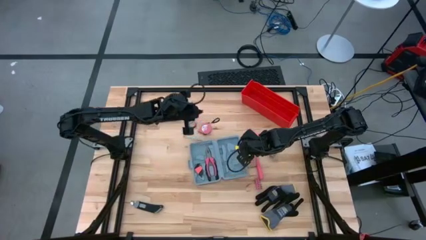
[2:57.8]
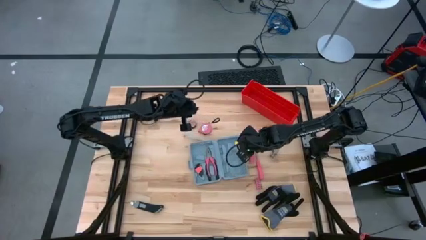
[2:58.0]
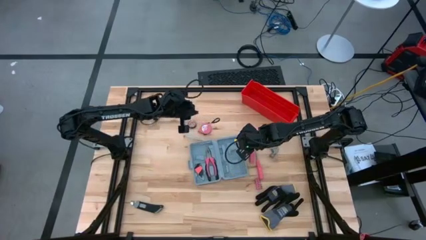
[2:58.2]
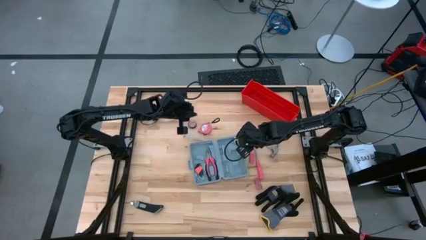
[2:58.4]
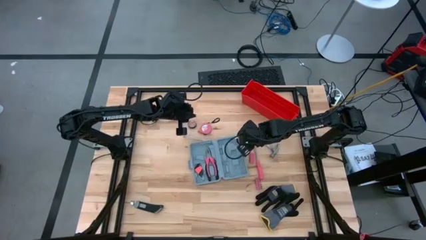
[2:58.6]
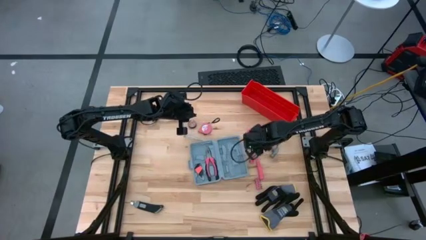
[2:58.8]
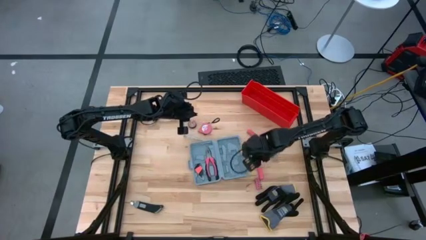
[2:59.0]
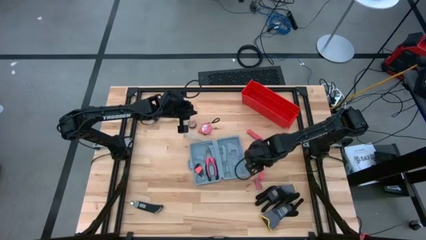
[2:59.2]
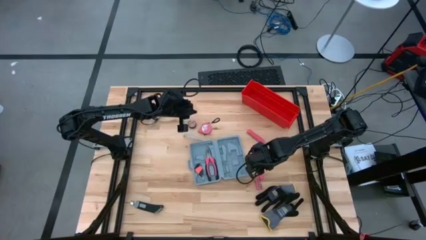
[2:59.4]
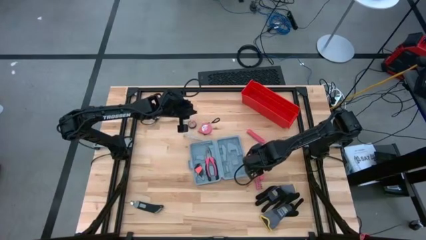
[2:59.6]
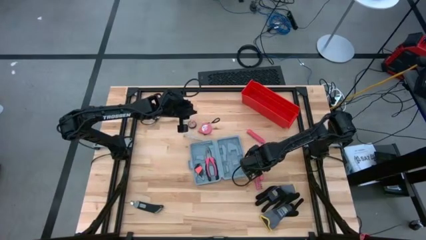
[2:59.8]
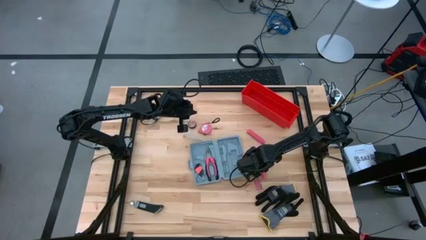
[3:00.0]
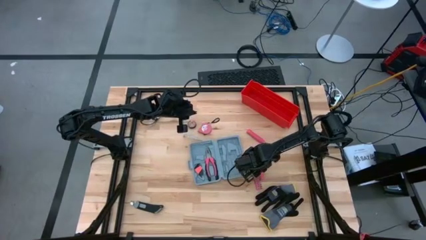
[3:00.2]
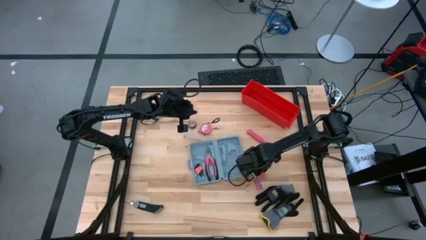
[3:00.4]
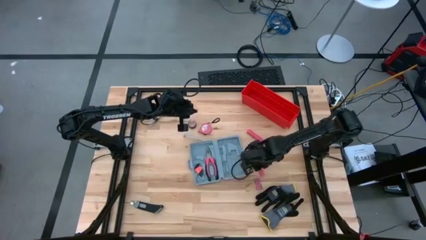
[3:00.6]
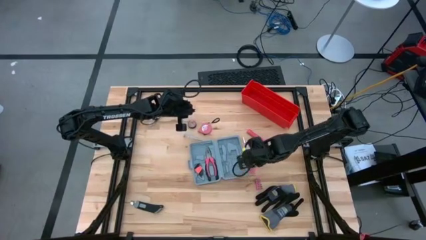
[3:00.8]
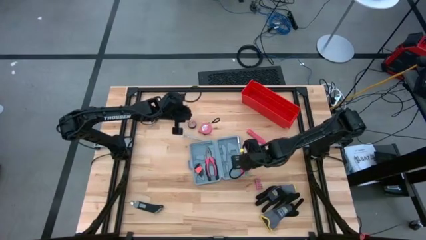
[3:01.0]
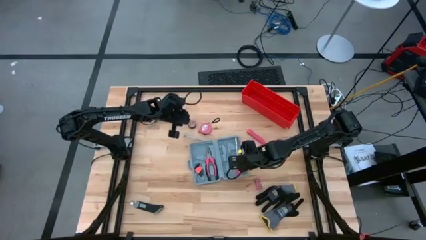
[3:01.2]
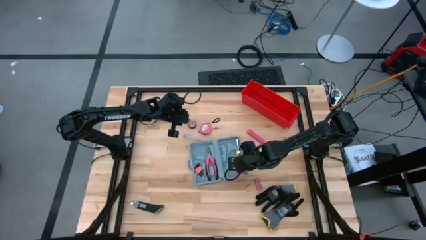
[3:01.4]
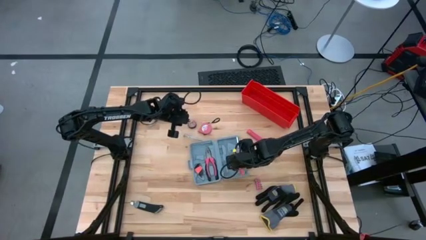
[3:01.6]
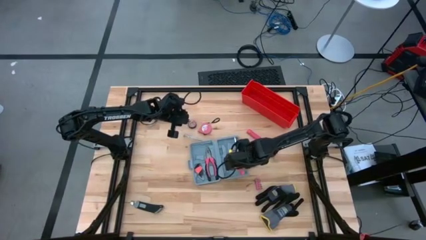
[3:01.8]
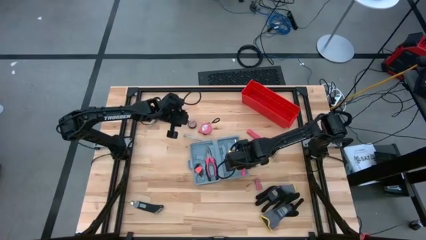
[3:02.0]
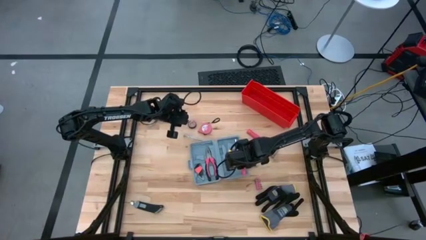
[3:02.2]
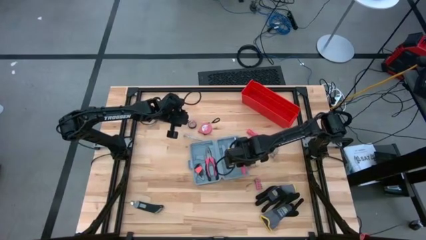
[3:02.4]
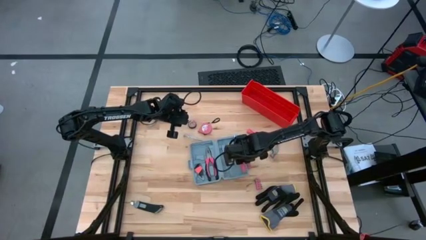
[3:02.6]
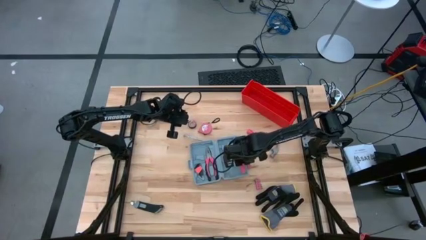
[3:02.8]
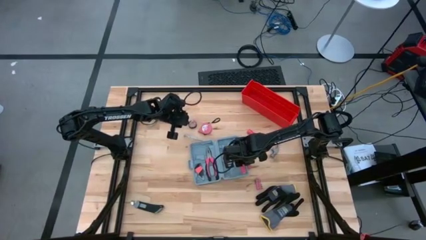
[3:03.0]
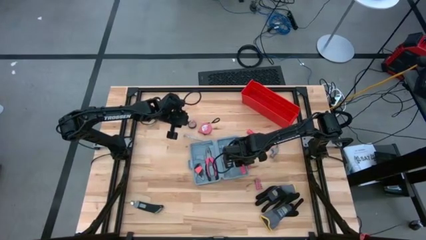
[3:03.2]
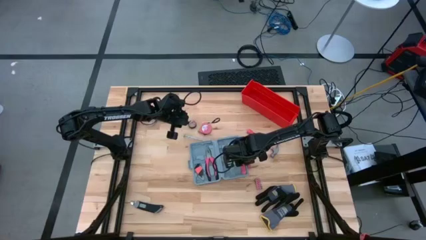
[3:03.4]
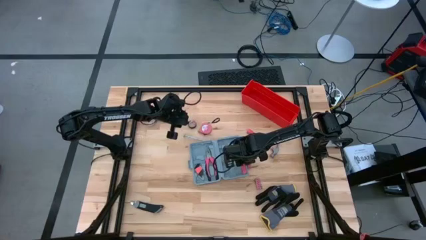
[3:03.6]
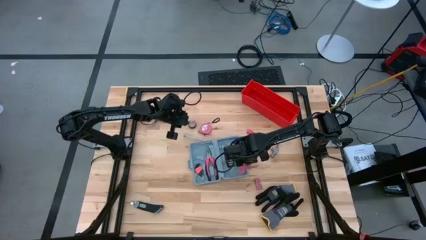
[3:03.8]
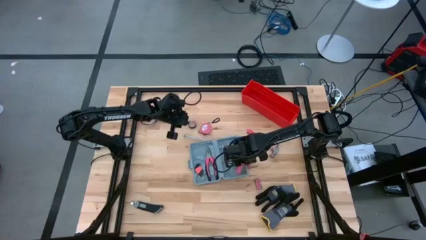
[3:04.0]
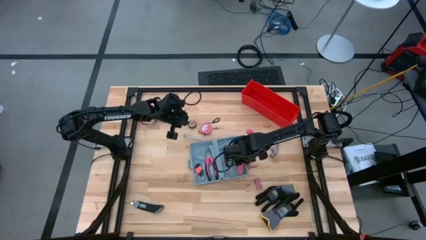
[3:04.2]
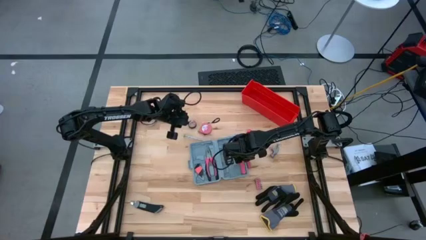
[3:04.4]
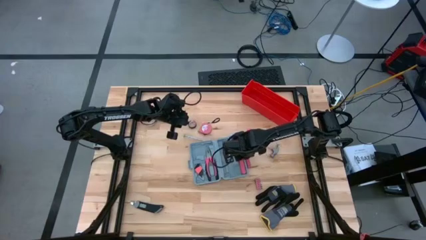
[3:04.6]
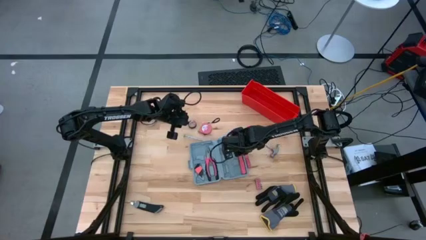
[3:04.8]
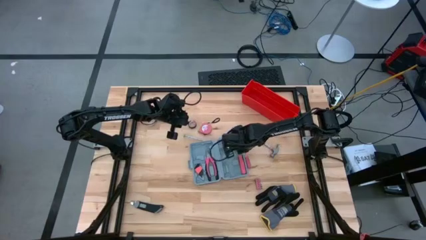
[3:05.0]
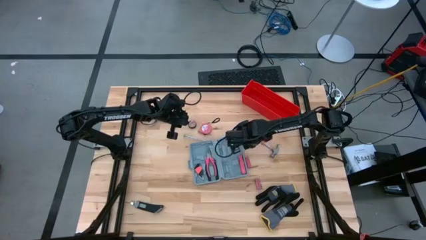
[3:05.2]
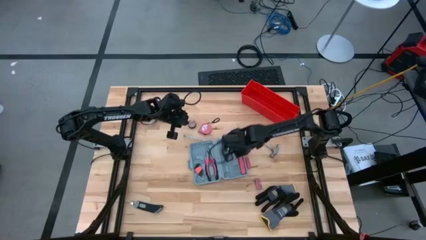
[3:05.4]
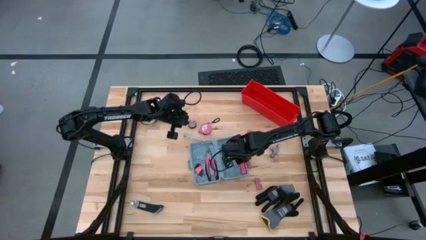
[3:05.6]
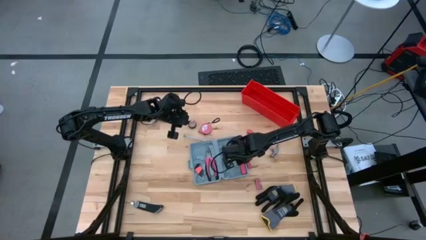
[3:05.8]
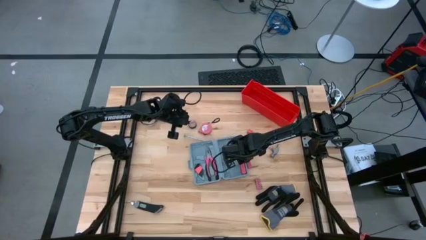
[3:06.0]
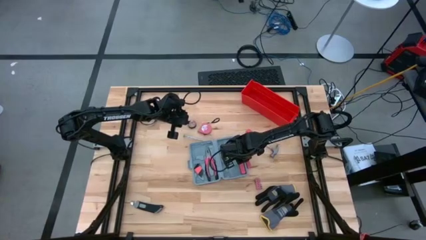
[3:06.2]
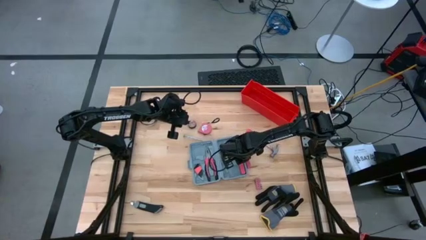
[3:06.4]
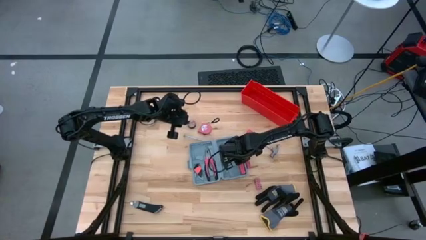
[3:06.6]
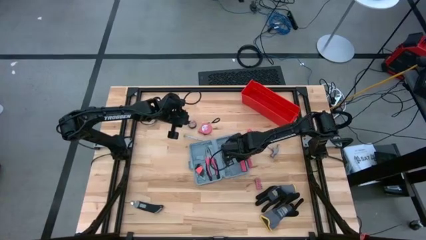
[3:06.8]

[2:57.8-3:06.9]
Task: prefit tool cases
Put the screwdriver into the toolbox

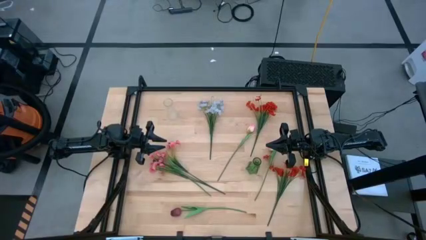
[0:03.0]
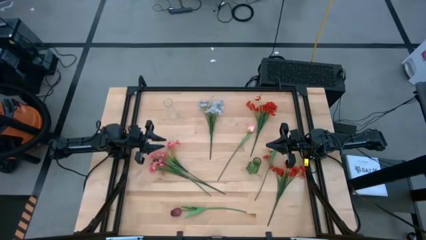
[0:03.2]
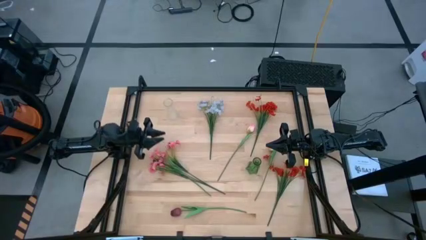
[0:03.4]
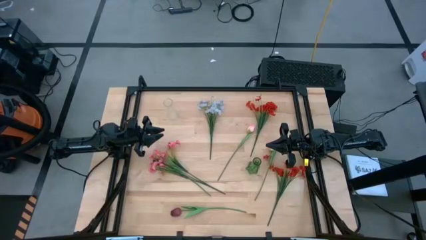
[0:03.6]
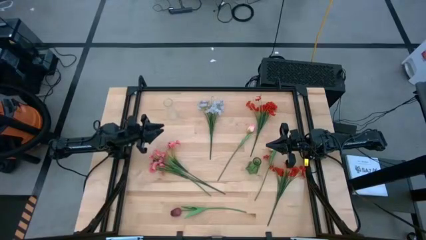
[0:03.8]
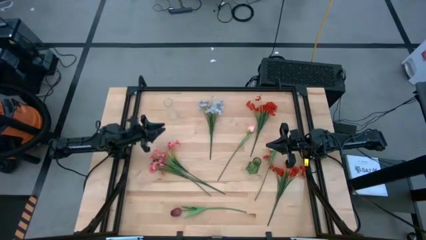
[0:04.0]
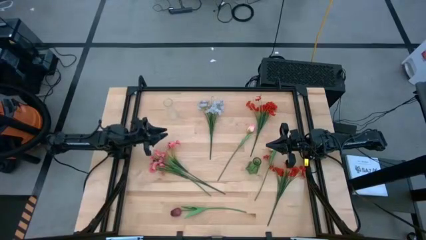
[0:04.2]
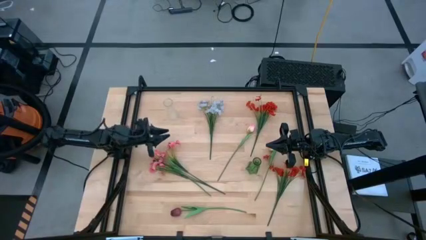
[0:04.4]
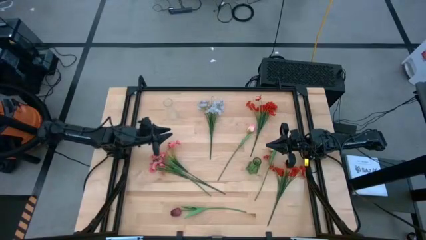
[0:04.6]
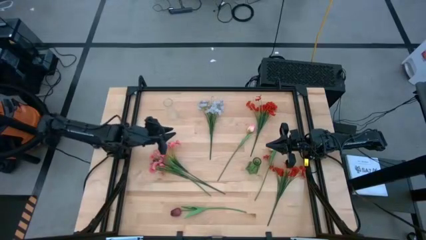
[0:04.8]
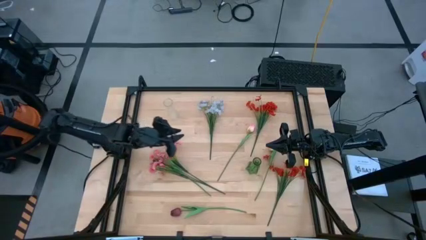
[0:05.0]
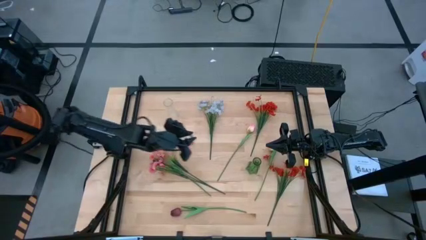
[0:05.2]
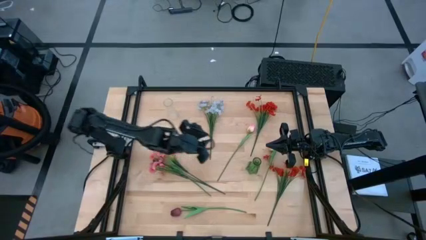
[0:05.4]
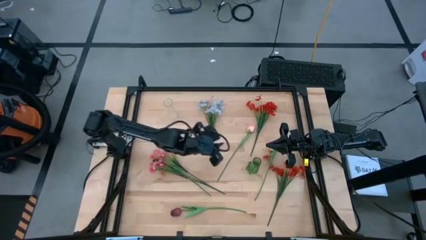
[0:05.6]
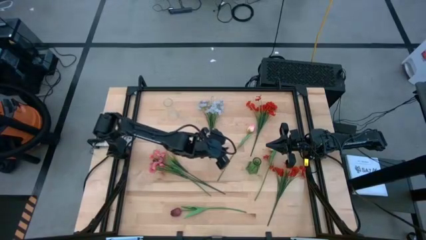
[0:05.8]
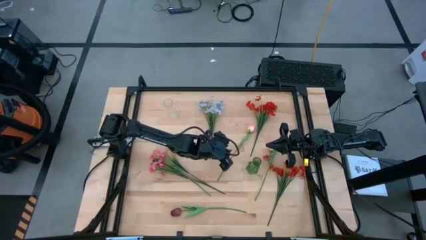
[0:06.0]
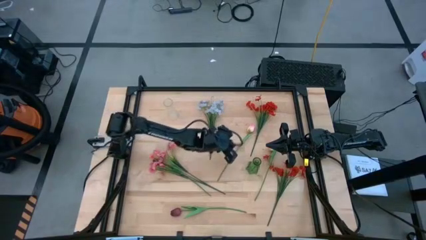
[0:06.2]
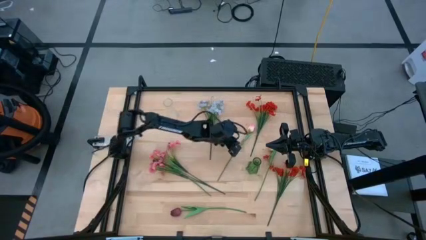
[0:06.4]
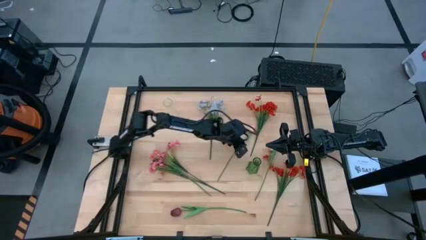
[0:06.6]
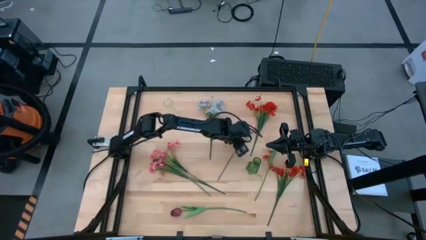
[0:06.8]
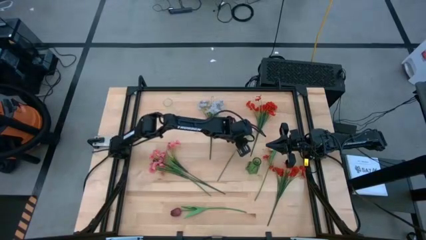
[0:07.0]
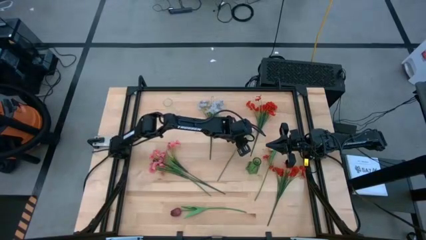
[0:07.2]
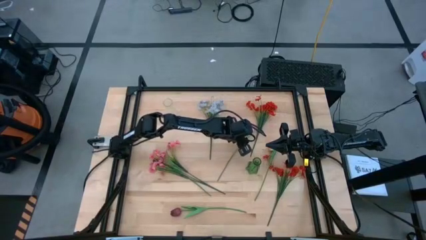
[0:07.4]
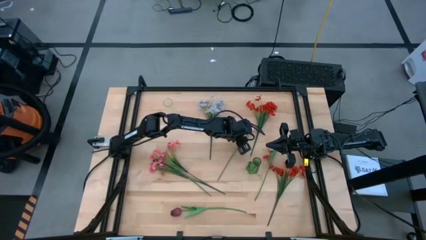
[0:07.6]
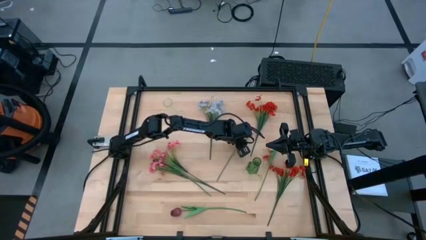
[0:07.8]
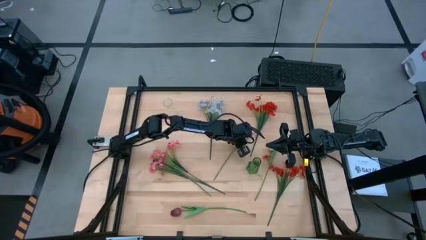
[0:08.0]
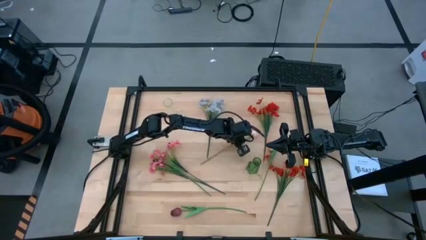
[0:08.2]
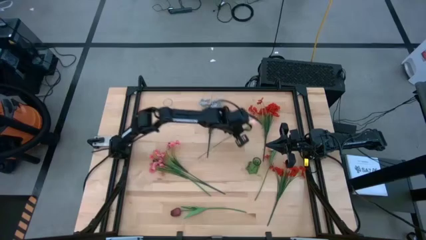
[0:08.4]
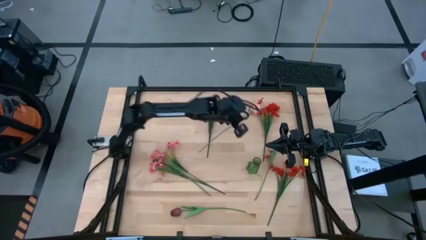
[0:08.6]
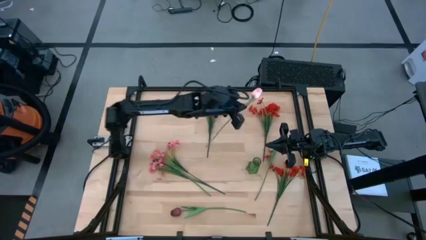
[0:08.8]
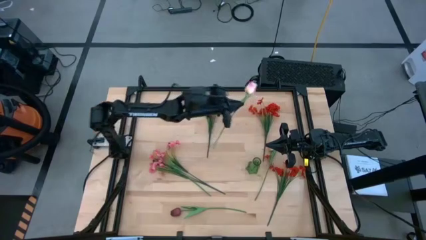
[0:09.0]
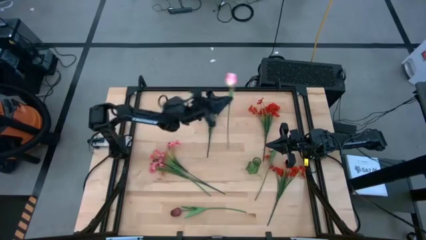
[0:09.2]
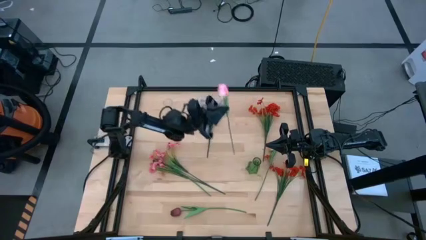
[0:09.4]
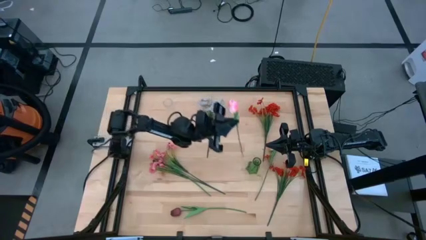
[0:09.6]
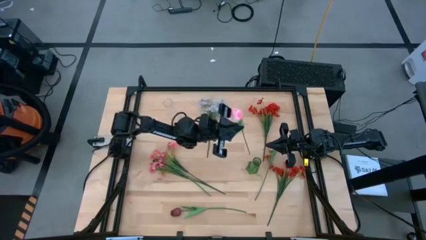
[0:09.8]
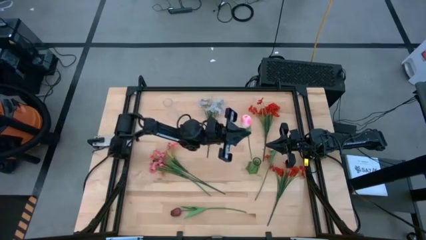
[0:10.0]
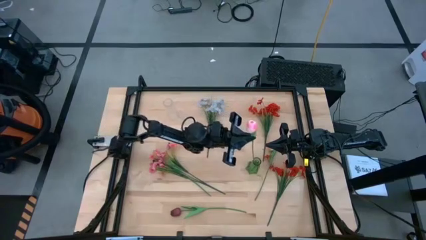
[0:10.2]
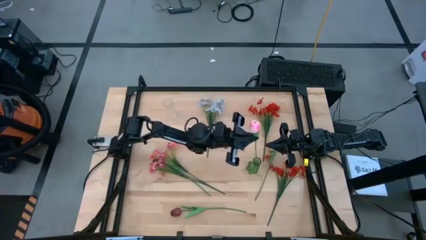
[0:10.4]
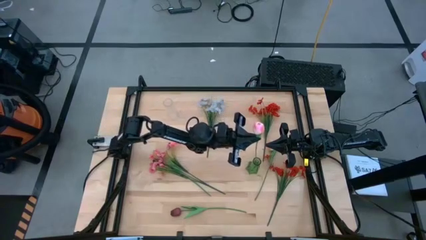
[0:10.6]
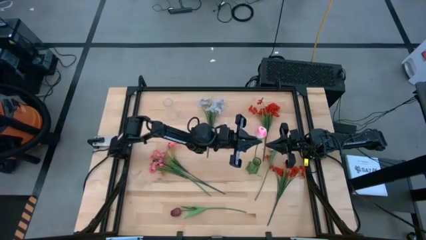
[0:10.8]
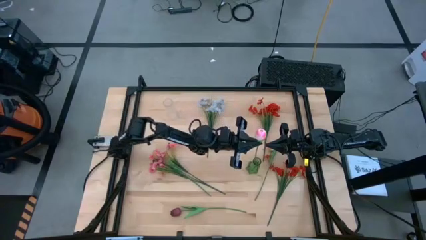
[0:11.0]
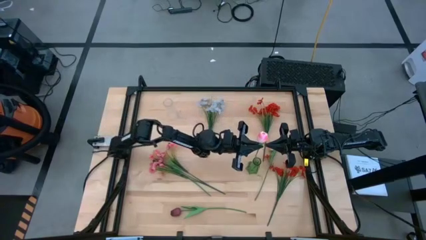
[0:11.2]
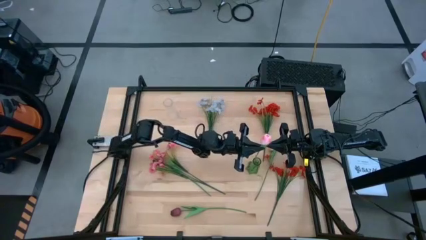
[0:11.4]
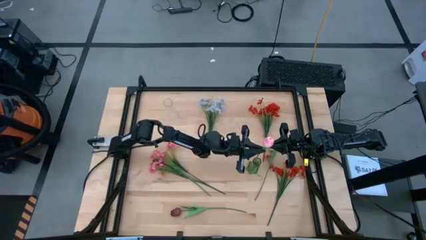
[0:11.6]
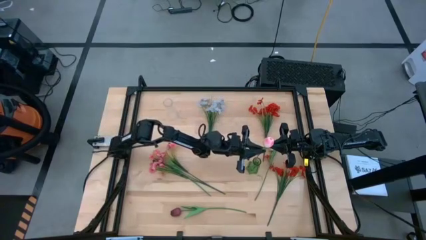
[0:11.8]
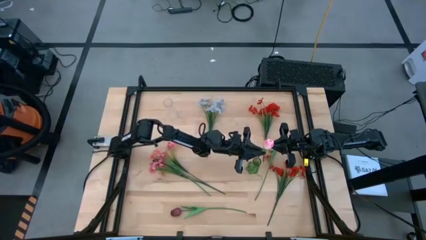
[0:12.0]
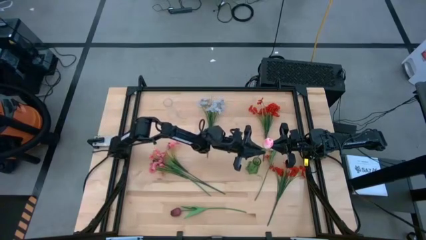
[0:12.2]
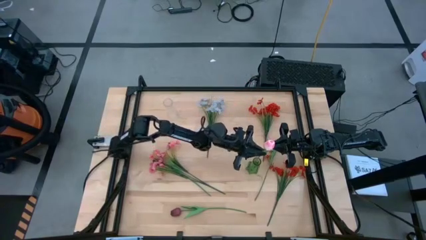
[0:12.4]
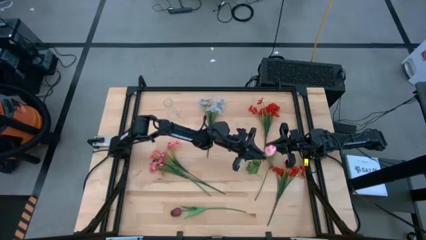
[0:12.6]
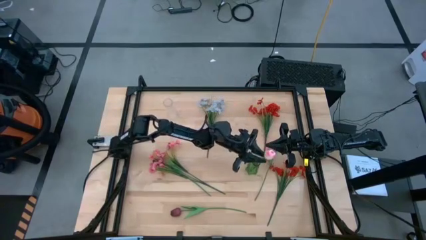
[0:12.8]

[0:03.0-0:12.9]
Task: Sort flowers into vase by color
Put the left pink flower into the green vase
